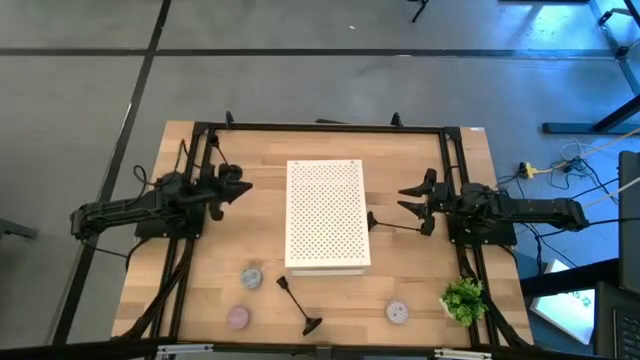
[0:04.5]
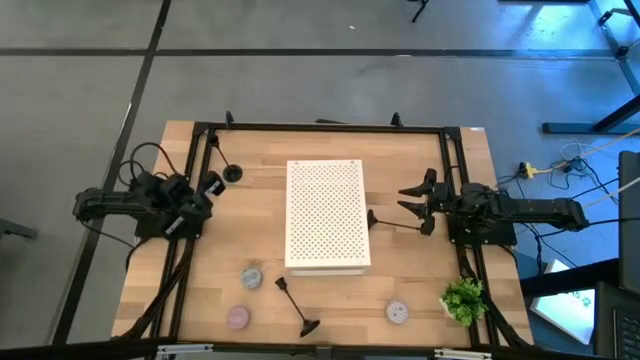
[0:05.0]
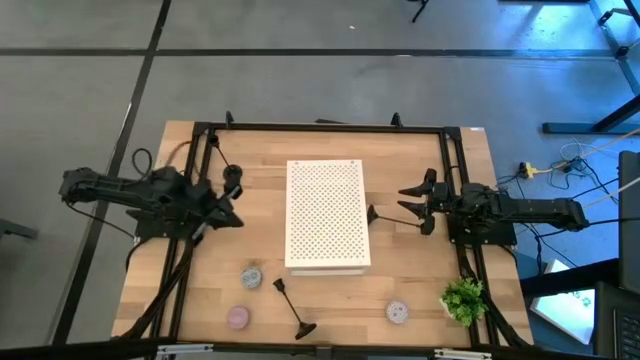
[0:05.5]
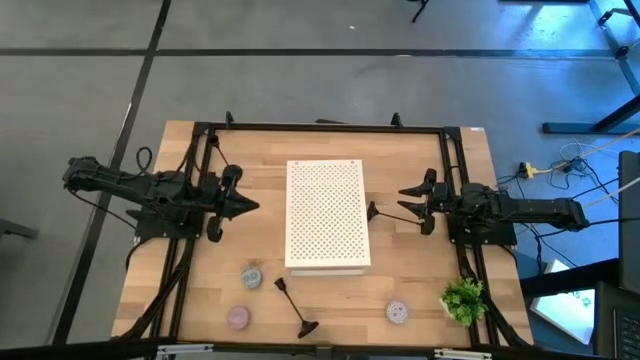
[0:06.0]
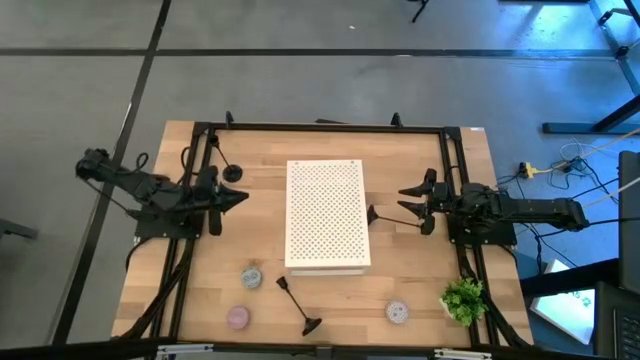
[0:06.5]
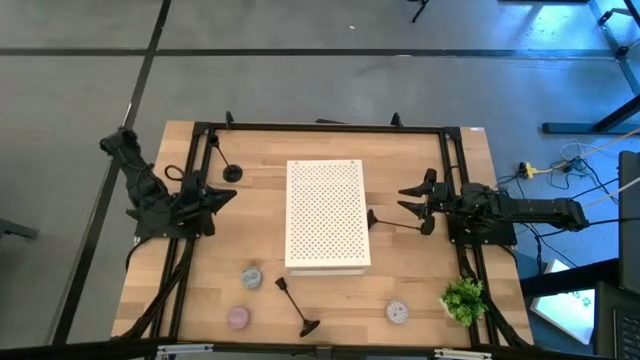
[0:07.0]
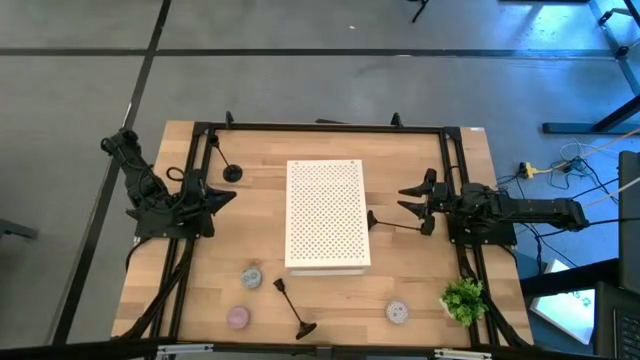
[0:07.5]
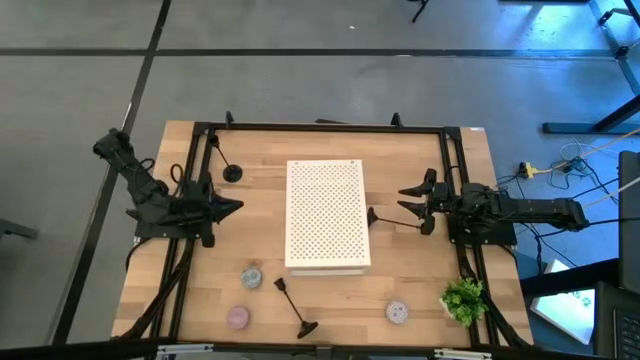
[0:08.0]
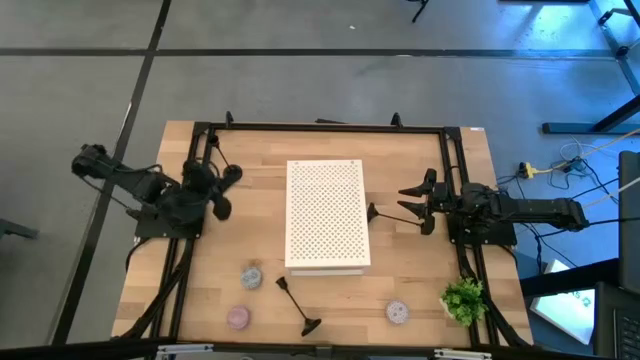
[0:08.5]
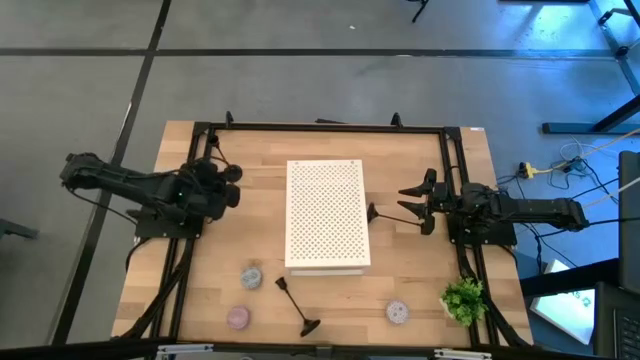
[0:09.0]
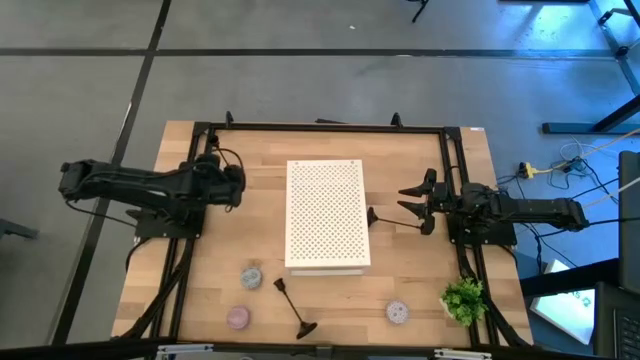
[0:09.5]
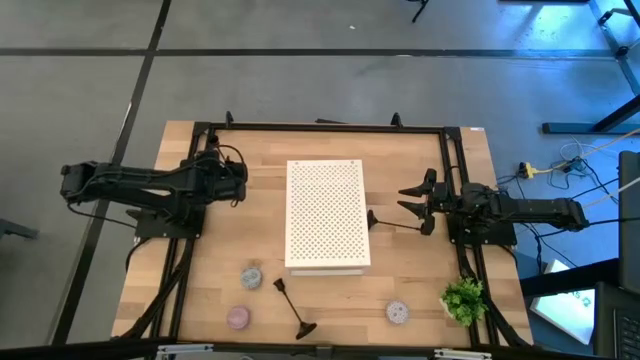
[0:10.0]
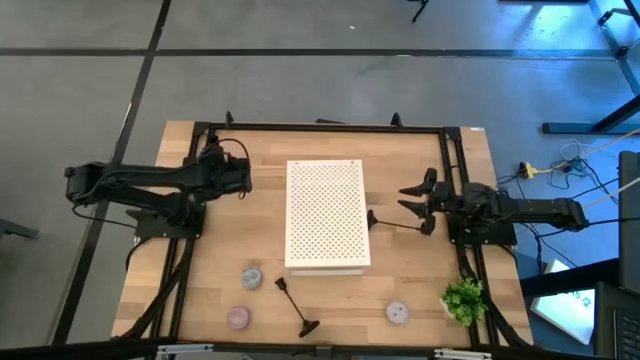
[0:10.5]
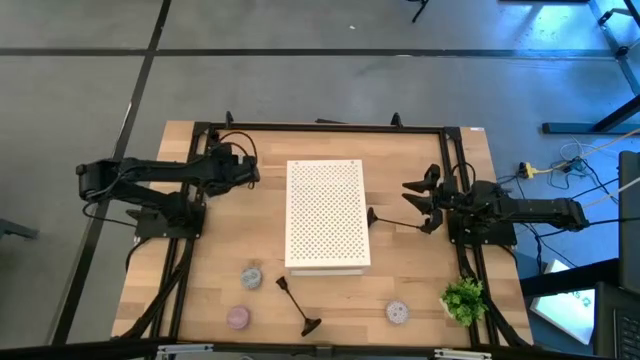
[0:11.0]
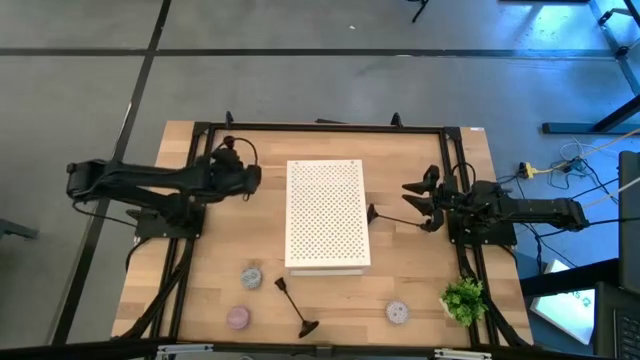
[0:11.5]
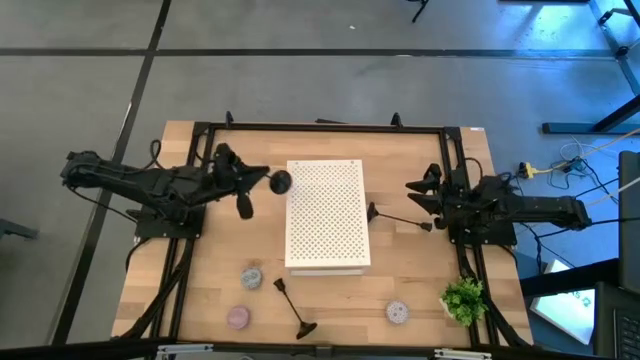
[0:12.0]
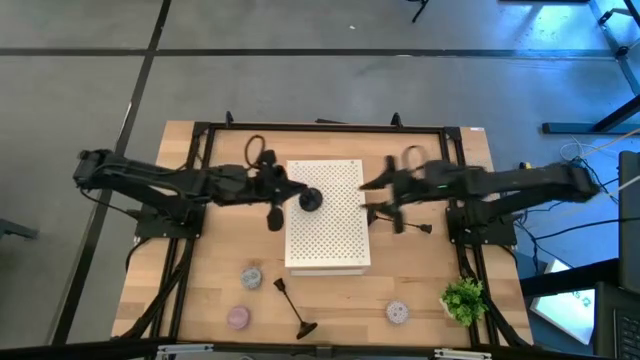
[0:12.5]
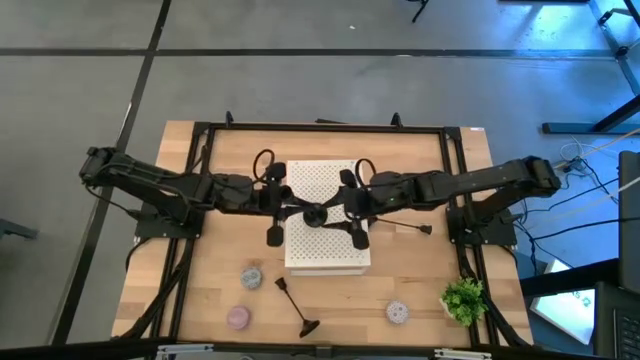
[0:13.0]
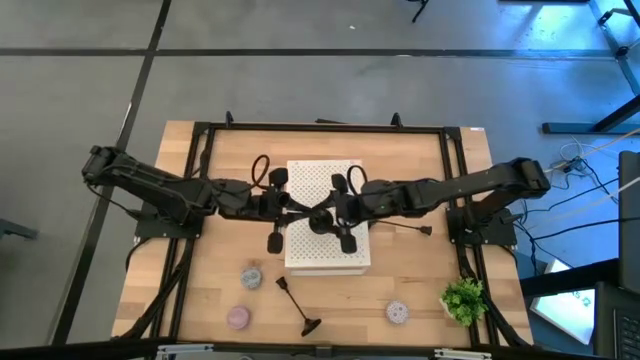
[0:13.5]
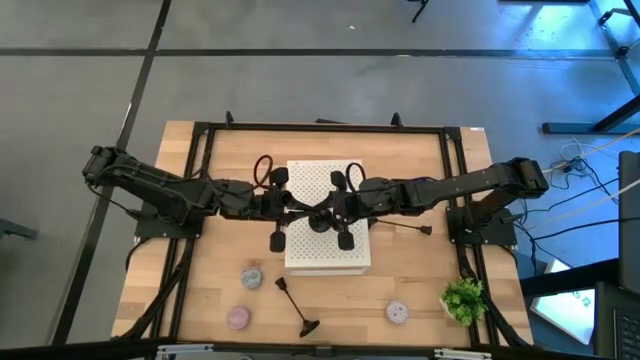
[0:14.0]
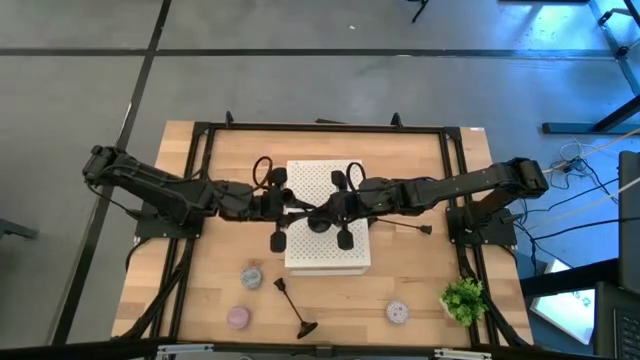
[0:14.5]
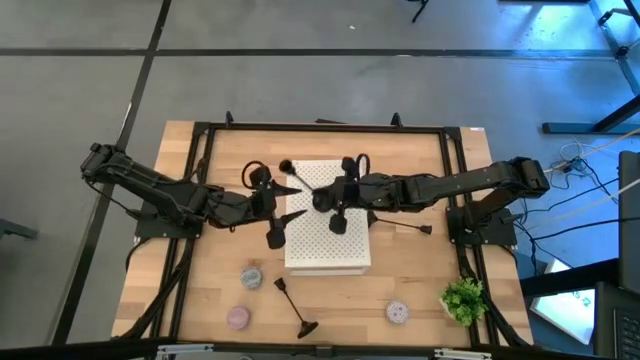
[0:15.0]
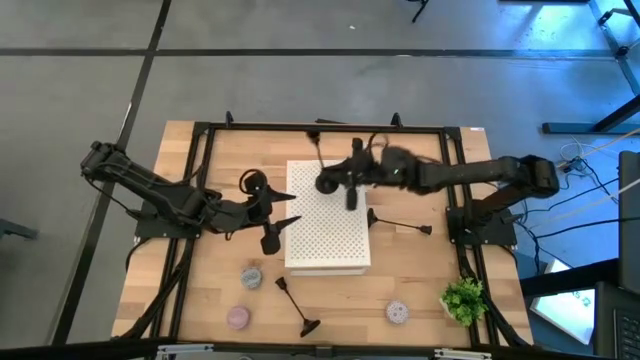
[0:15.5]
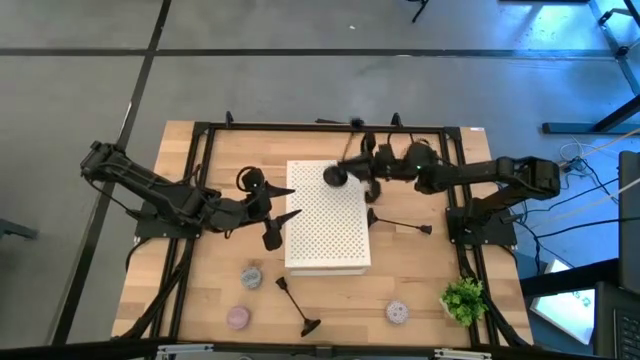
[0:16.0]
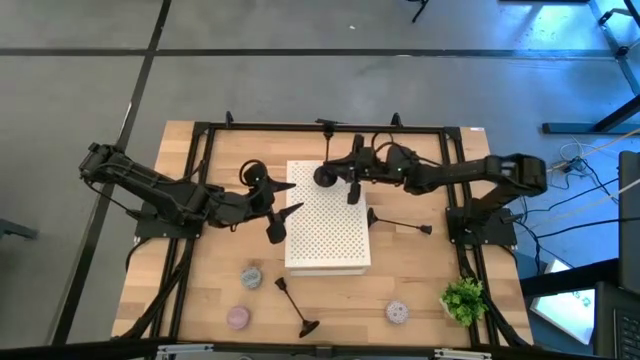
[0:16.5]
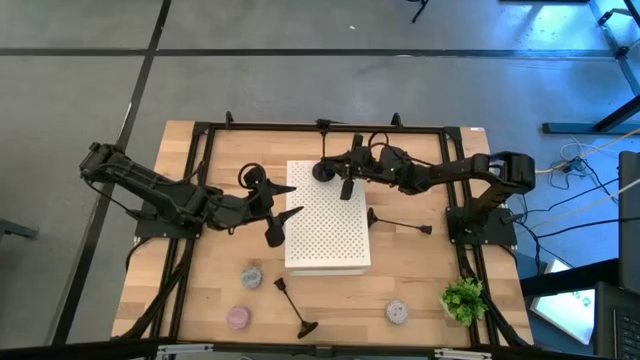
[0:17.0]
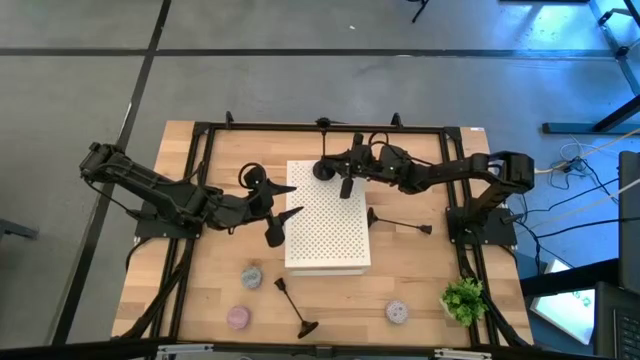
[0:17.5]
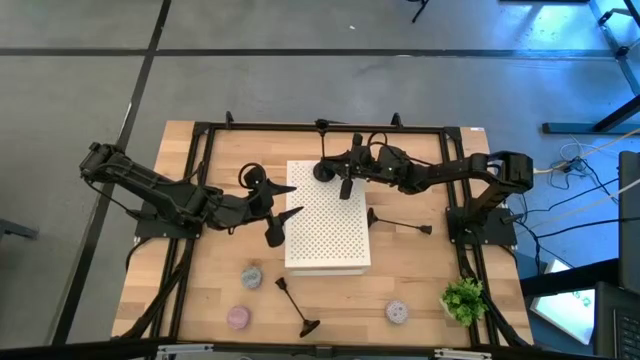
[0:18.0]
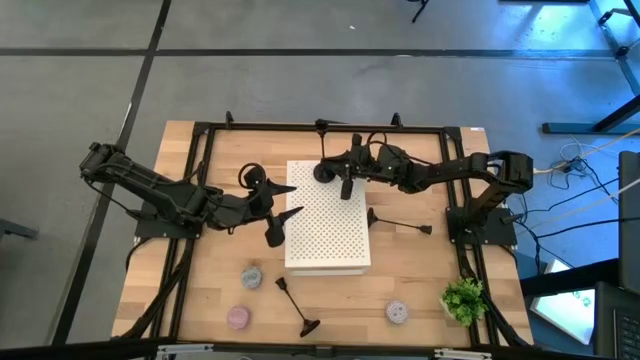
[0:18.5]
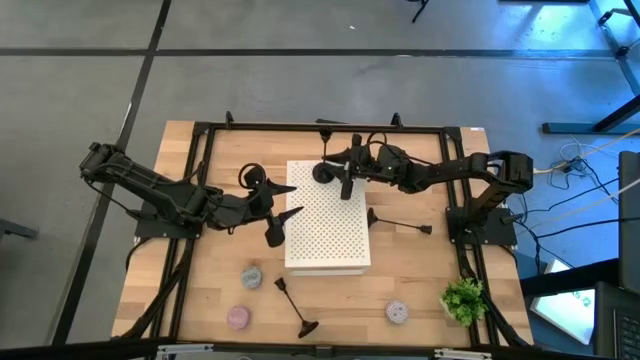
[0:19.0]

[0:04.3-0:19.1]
Task: Pick & Place candle stick holders
Put the top left black candle holder on the shelf

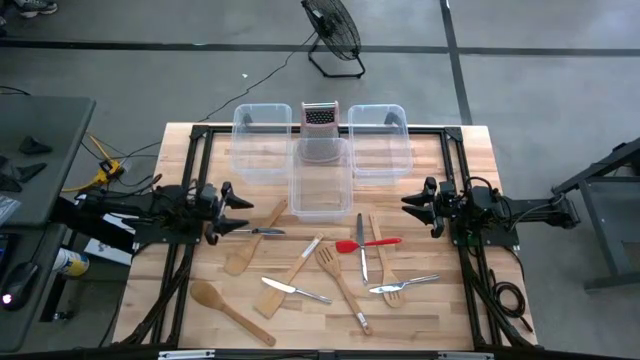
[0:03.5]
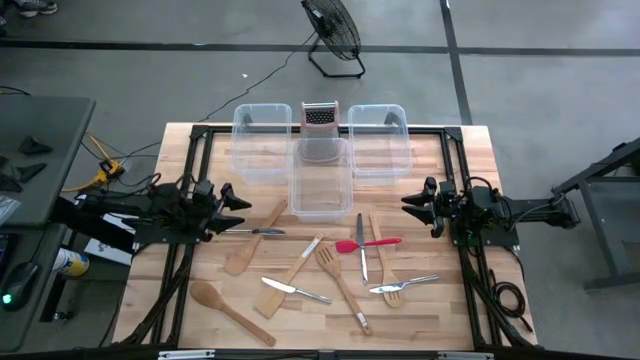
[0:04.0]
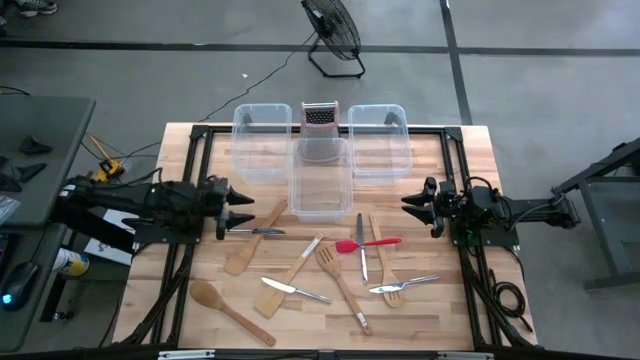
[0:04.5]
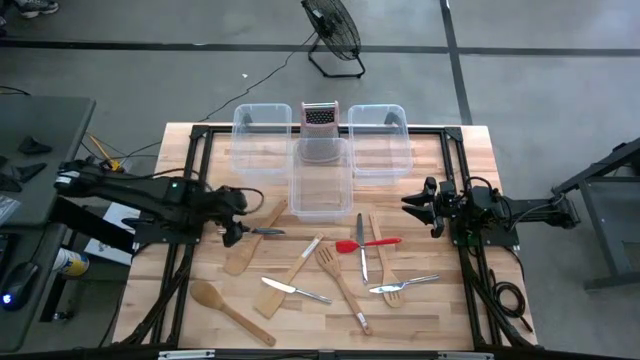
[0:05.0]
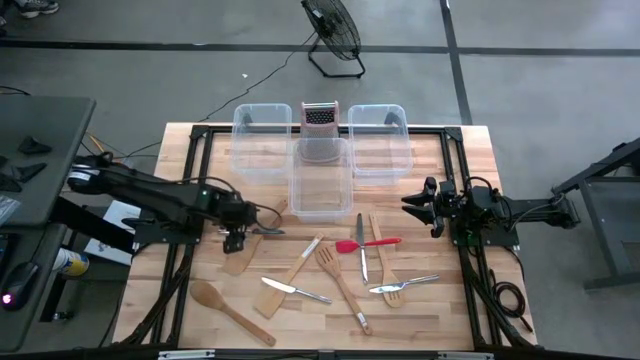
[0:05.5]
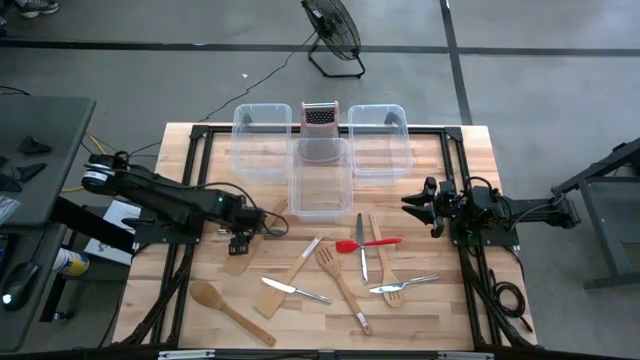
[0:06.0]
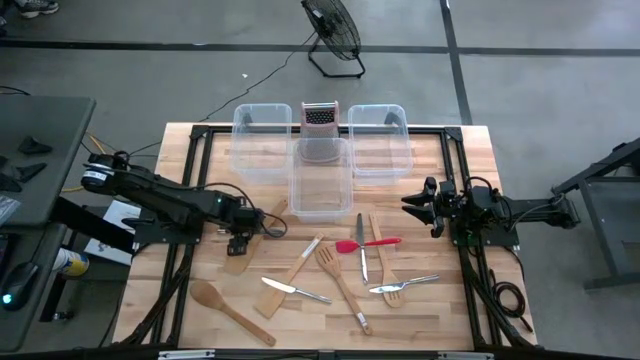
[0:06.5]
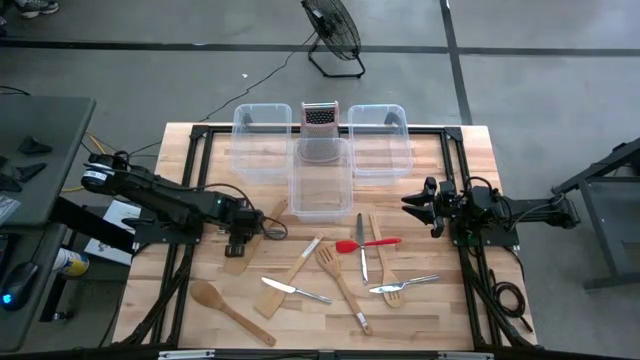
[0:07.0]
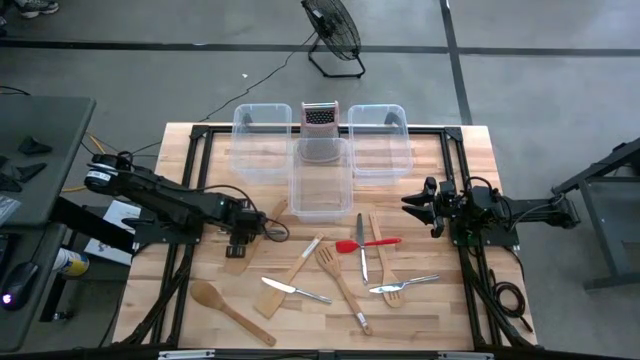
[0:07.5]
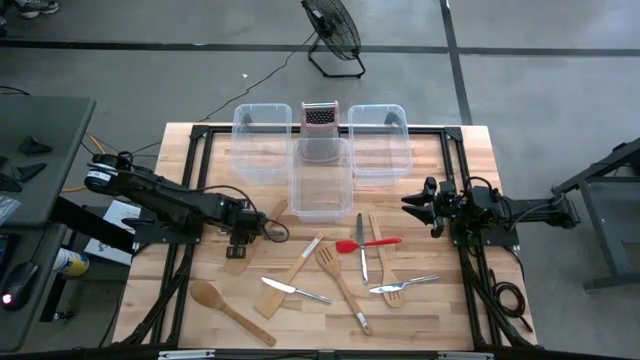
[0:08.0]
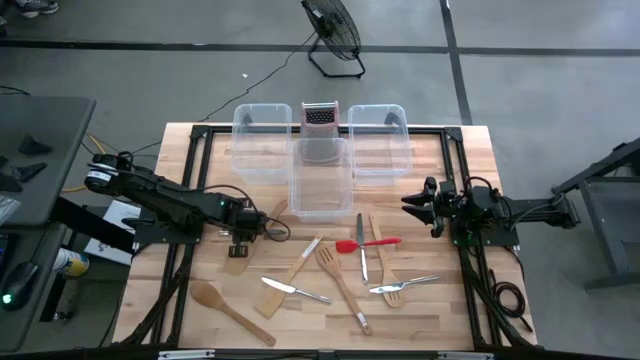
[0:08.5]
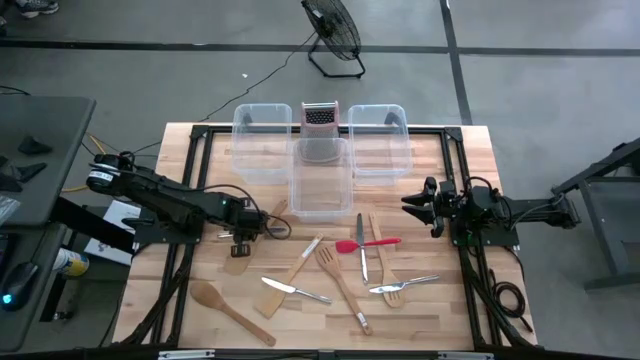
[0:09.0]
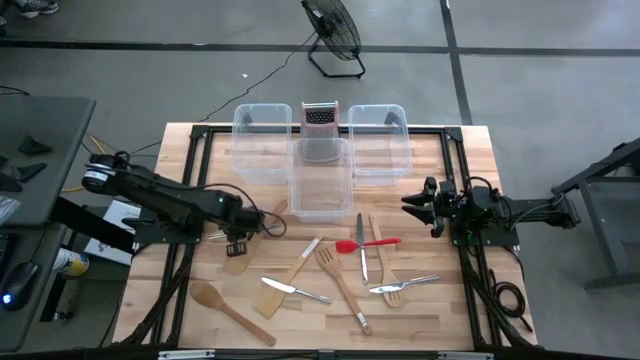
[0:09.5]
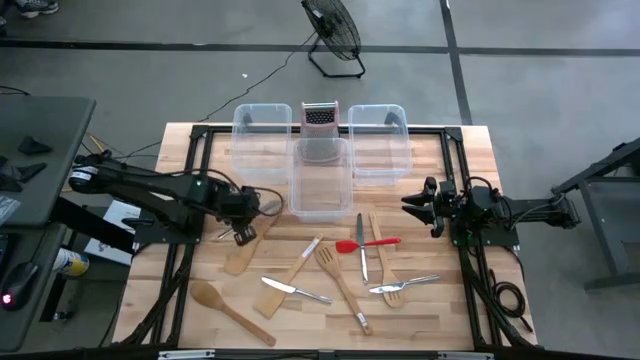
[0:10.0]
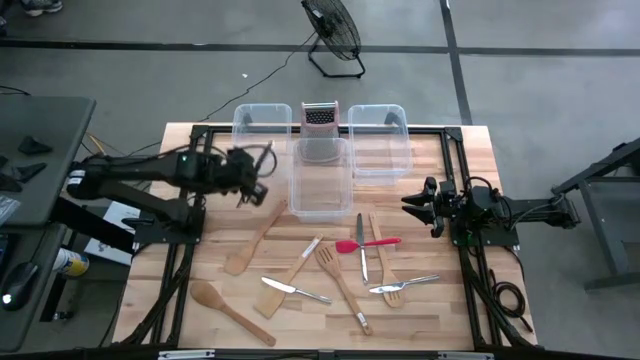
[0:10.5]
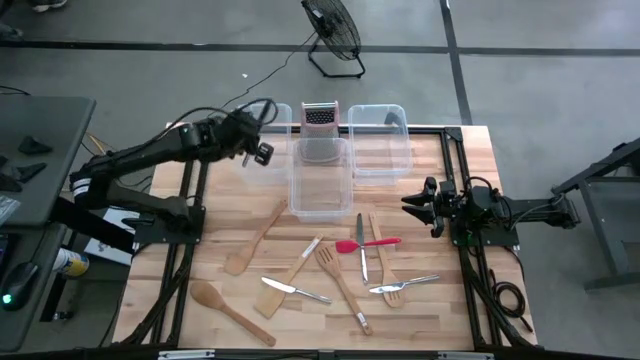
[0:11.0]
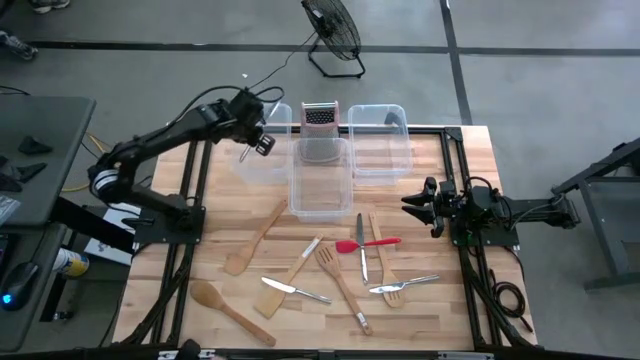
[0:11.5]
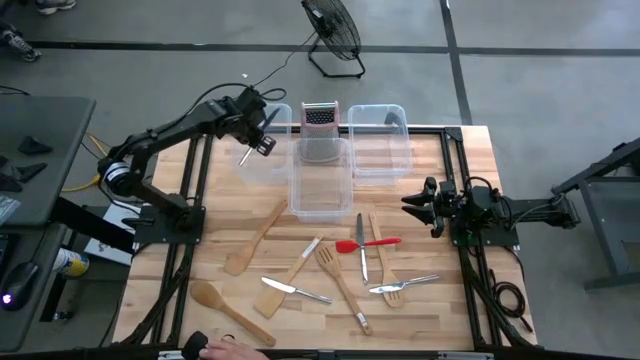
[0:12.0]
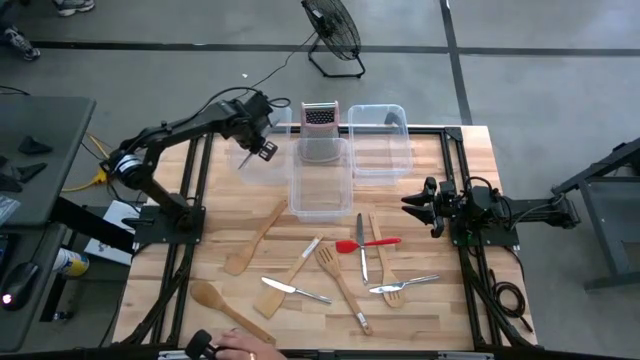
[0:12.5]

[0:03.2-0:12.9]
Task: Pick & Place Kitchen Items
Put the silver knife into the left transparent bin
